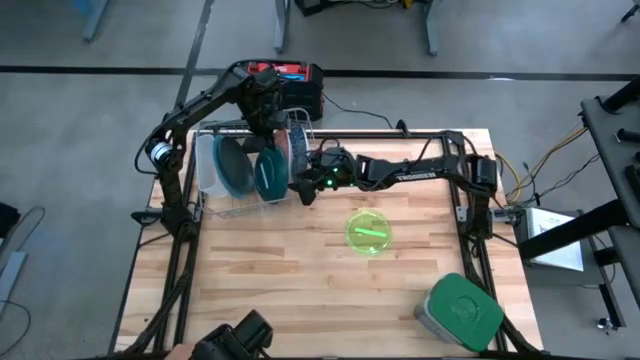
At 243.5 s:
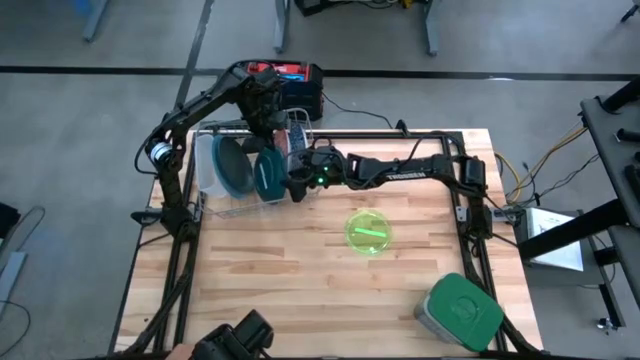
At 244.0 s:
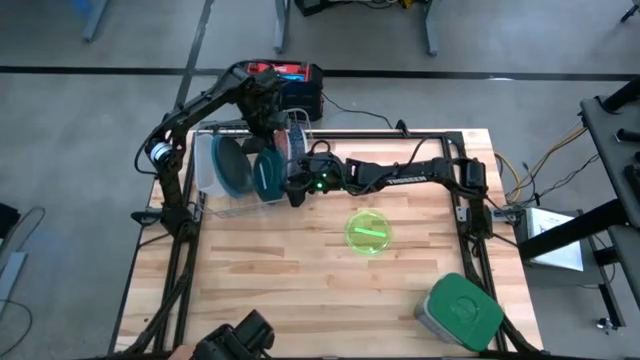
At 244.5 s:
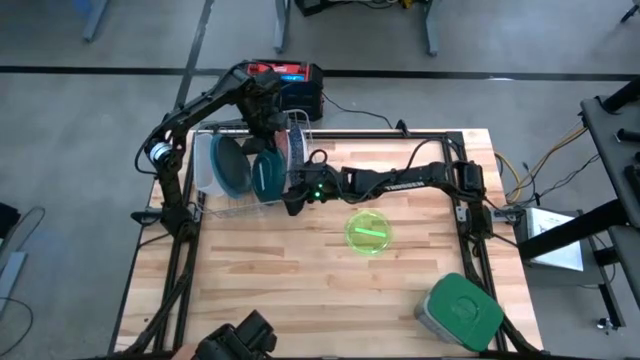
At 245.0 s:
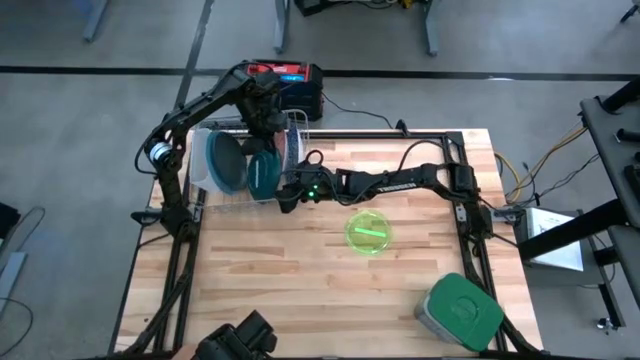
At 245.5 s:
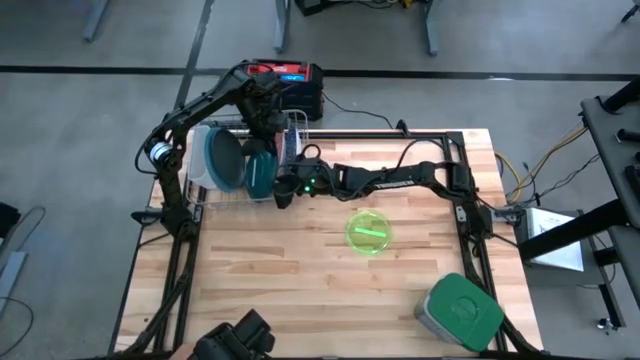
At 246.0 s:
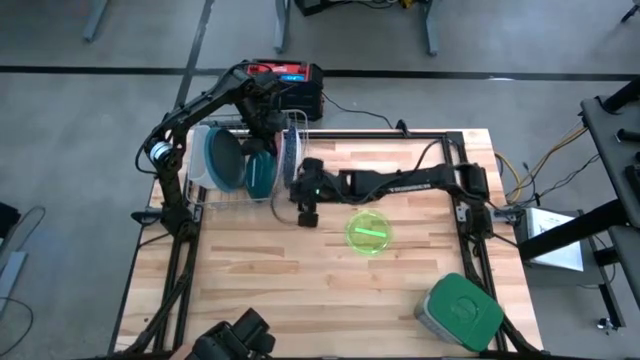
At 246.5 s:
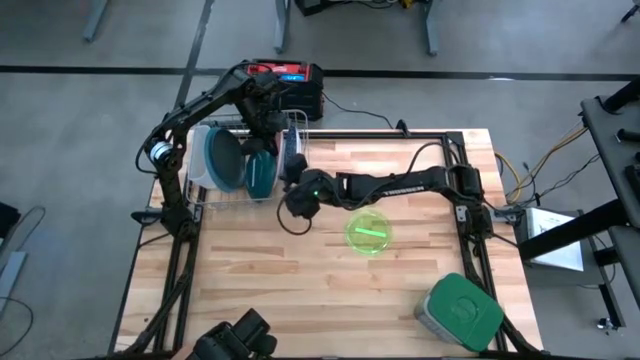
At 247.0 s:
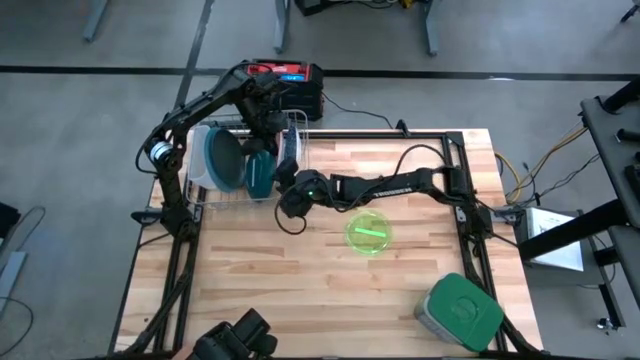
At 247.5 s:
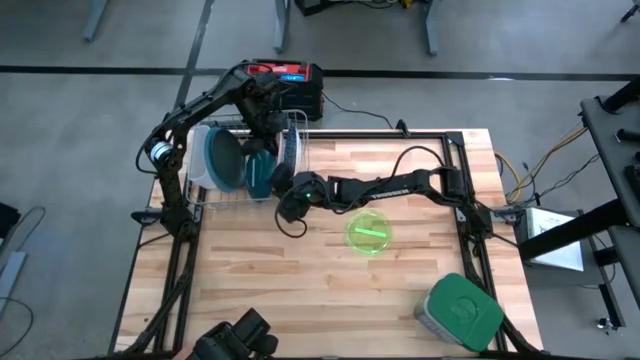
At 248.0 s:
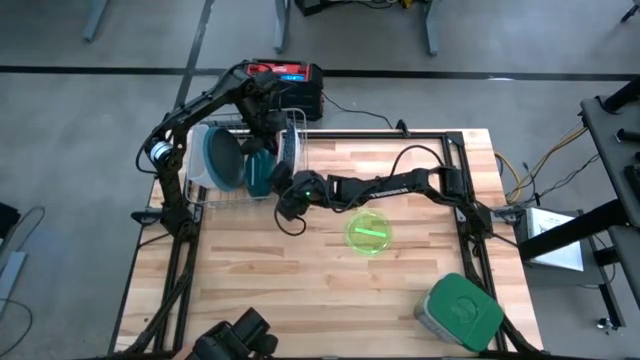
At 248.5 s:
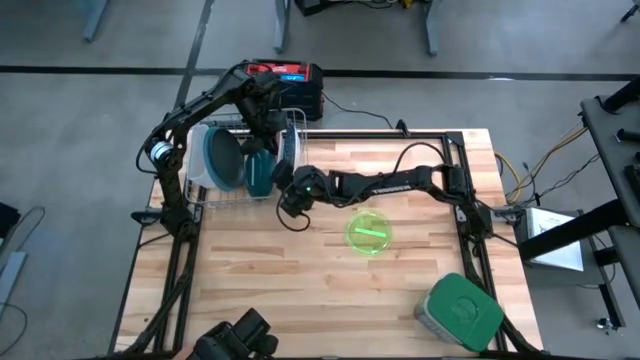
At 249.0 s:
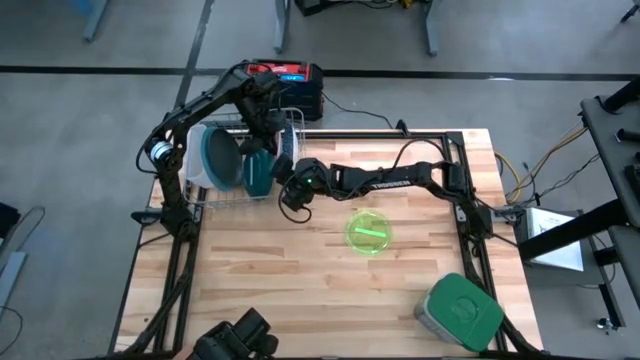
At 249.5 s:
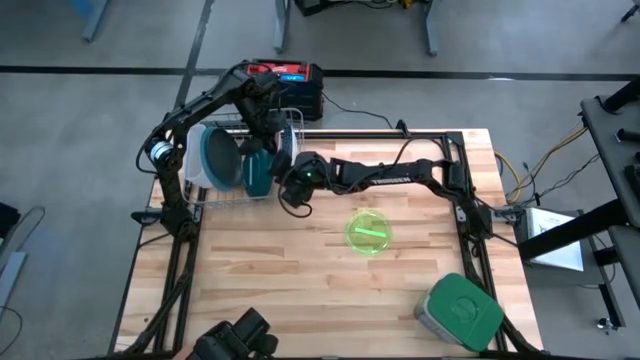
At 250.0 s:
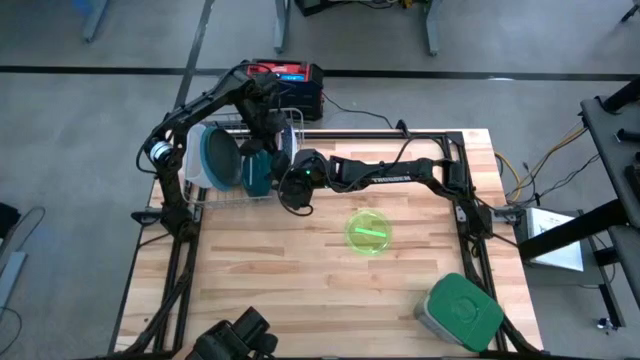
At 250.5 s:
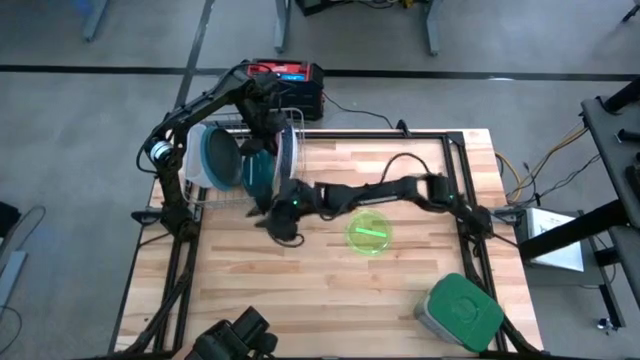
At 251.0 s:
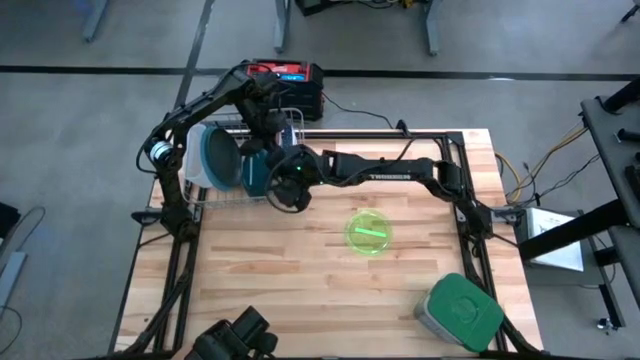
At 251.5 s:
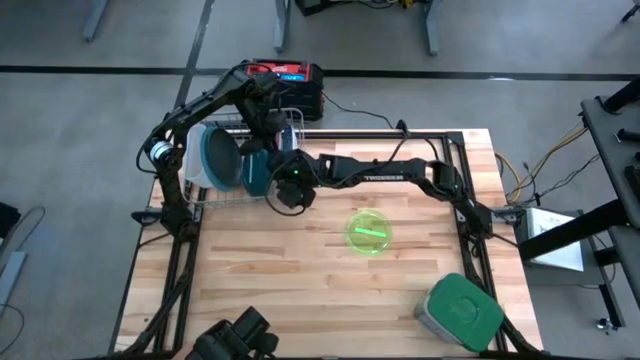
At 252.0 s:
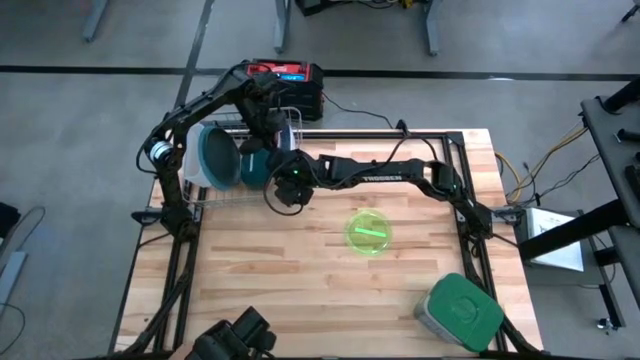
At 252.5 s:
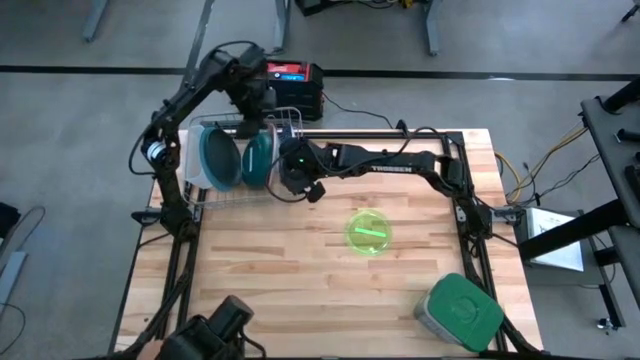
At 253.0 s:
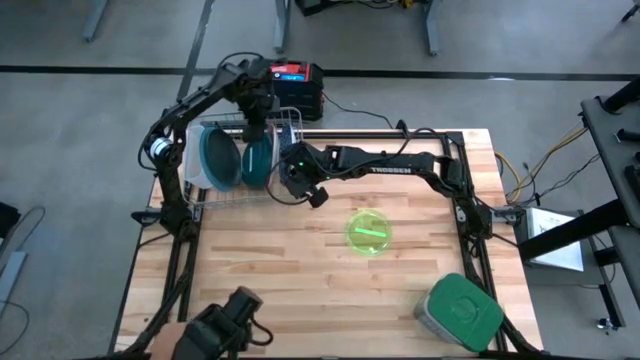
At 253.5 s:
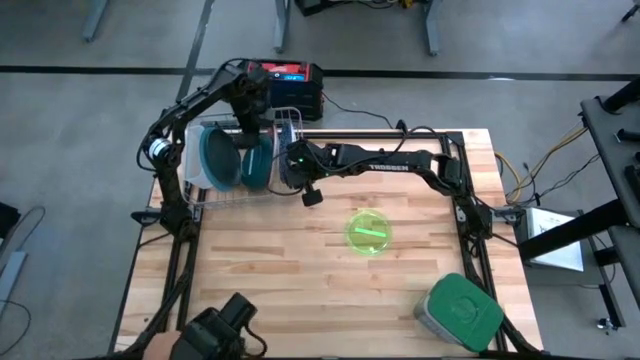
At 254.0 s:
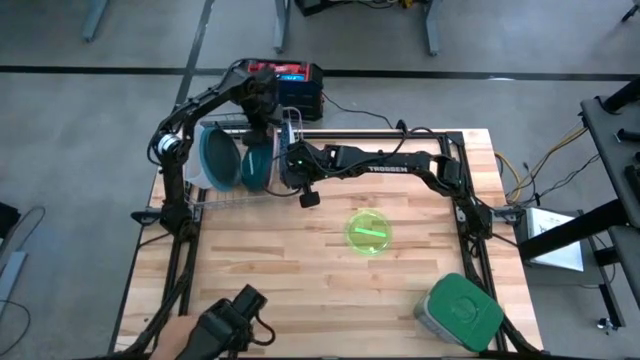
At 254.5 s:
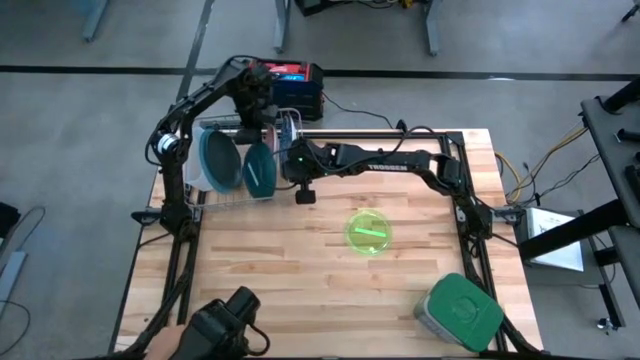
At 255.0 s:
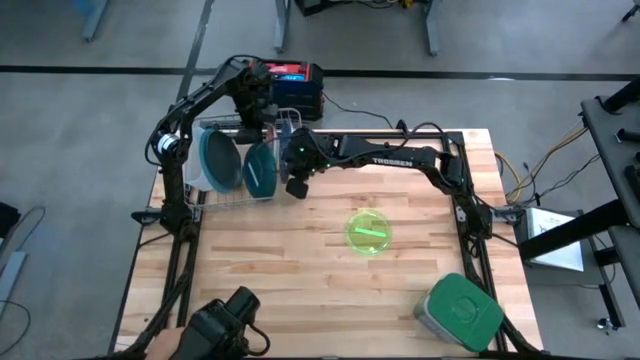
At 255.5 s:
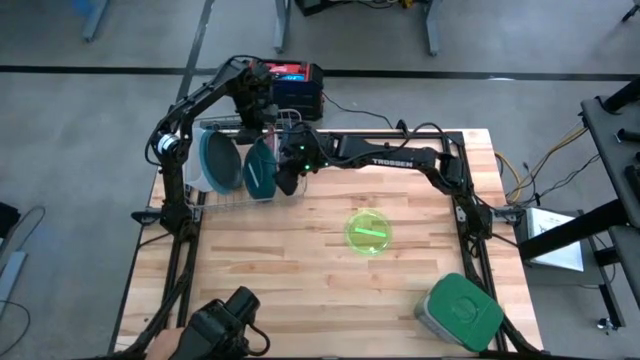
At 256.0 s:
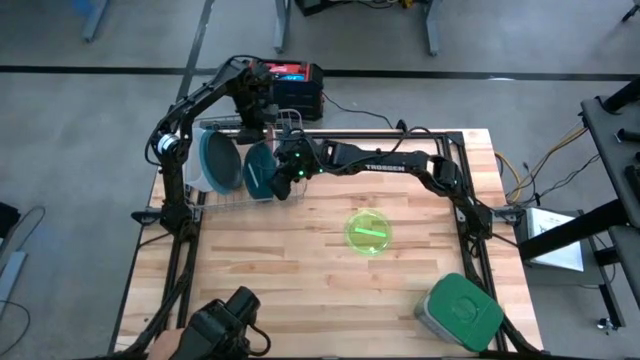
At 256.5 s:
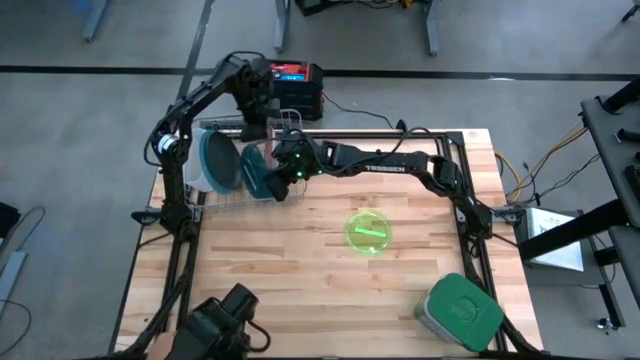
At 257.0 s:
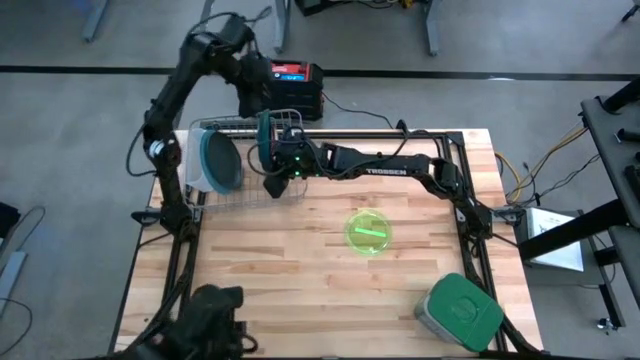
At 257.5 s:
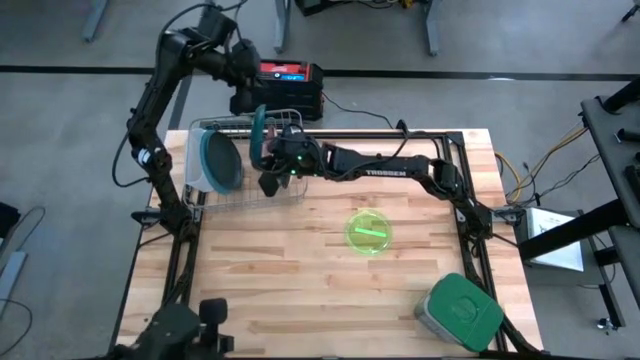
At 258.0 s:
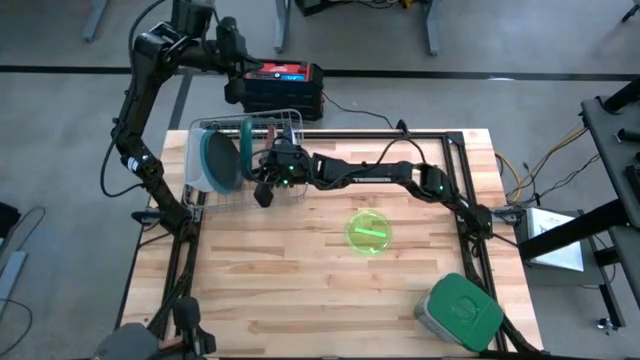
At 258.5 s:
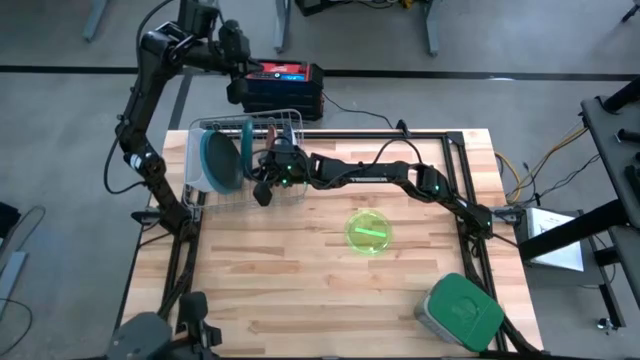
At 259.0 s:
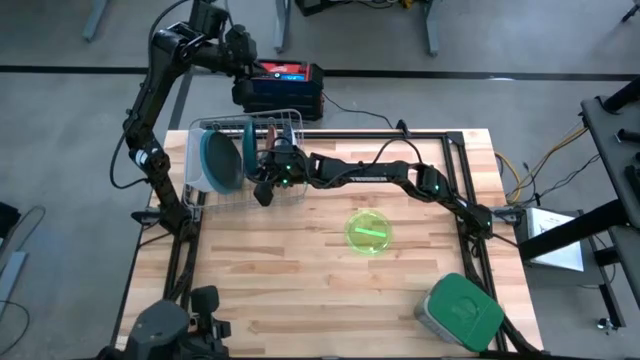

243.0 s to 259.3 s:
Task: Sort dishes
Put the green plate into the dish rack

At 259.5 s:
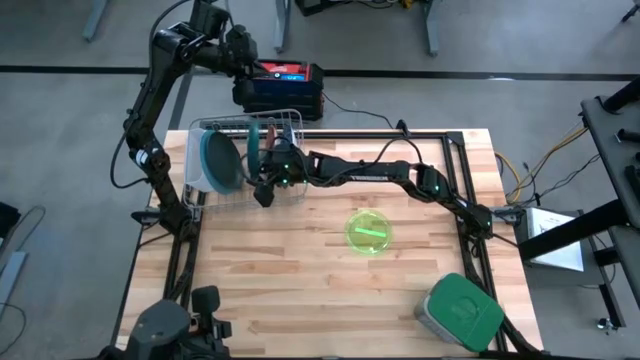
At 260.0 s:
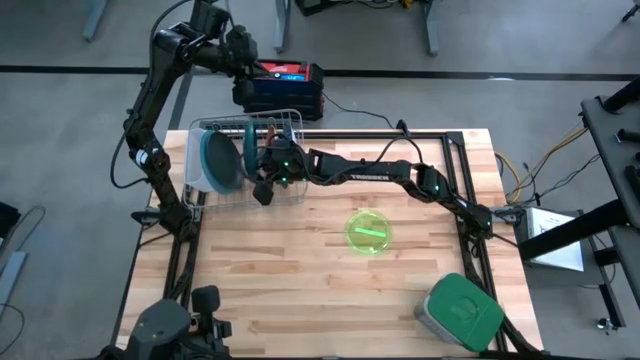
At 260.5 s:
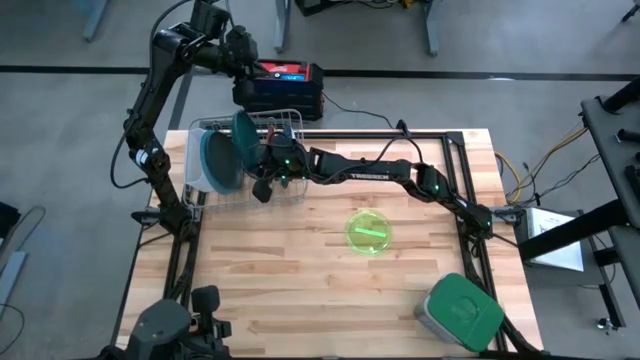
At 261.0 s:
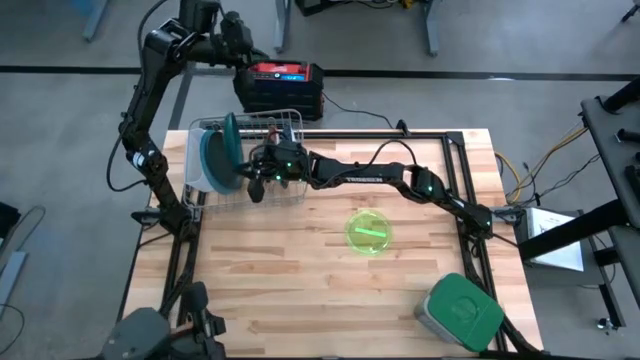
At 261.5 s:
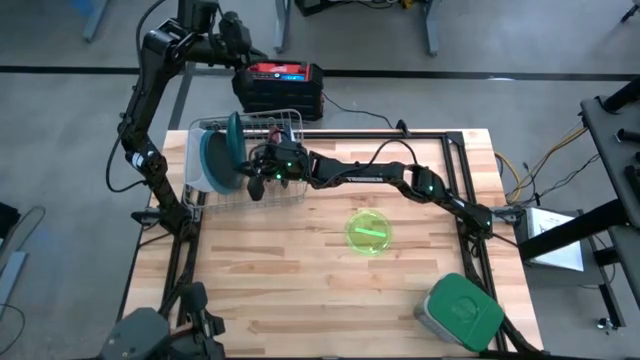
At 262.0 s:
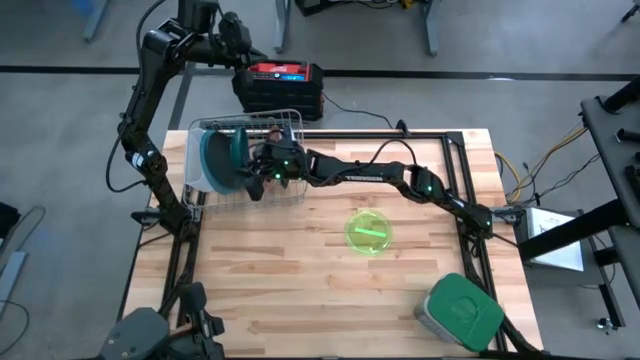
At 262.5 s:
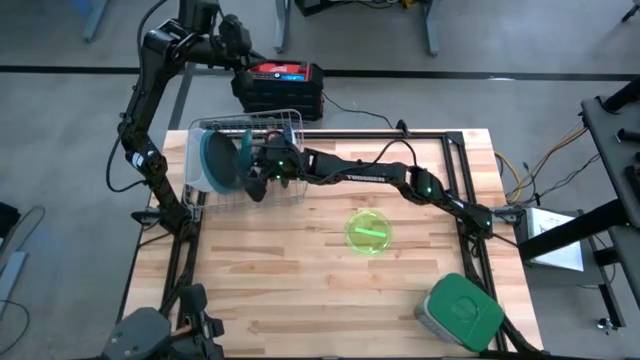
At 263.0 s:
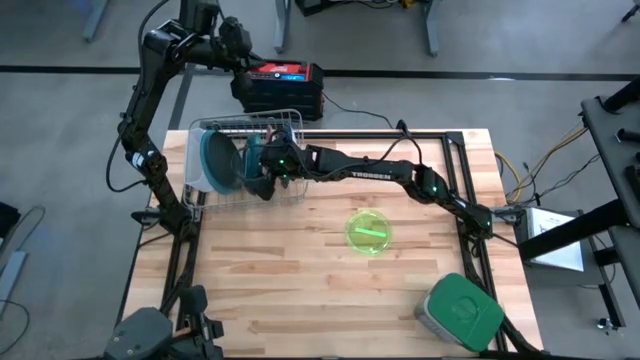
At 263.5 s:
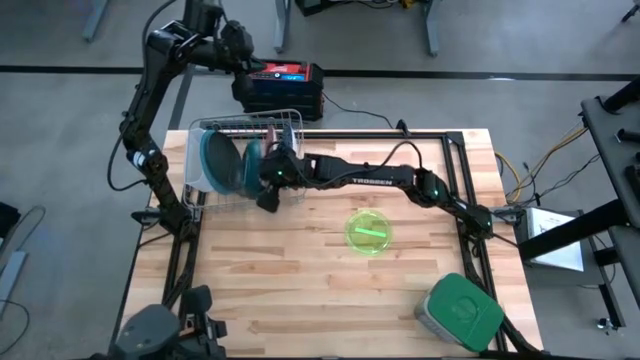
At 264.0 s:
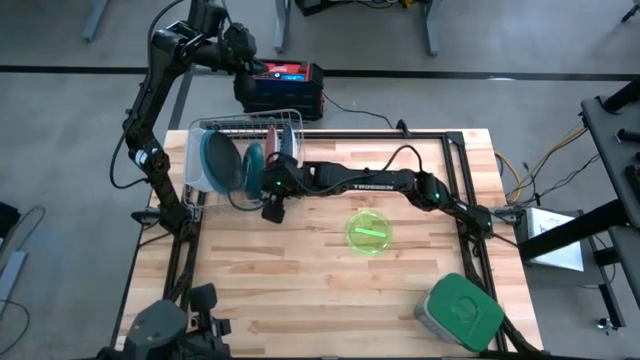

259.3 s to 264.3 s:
Put the green plate into the dish rack
